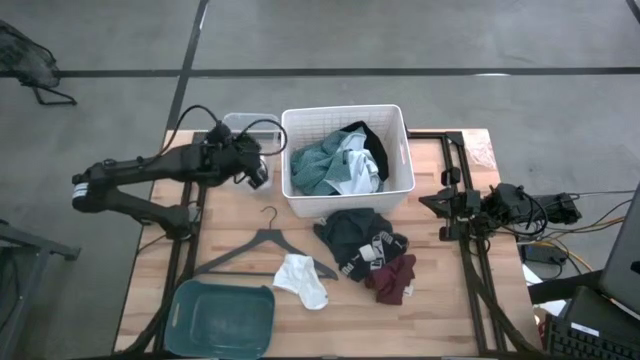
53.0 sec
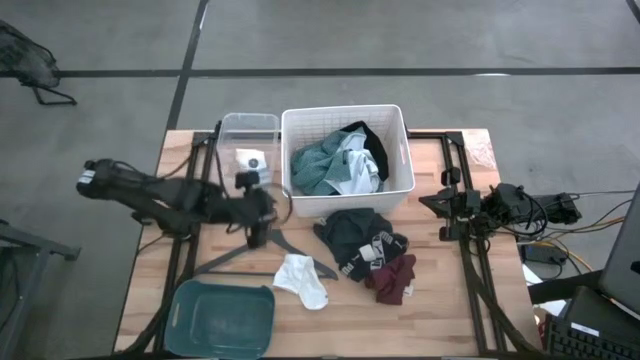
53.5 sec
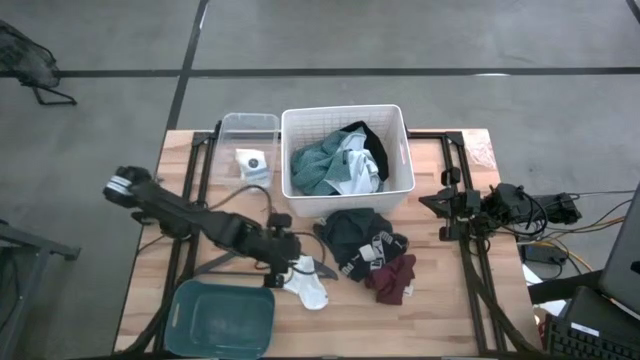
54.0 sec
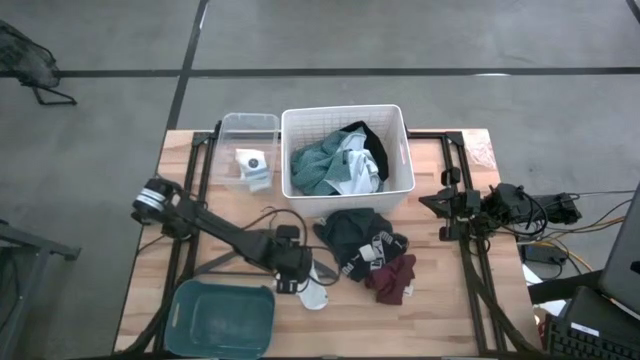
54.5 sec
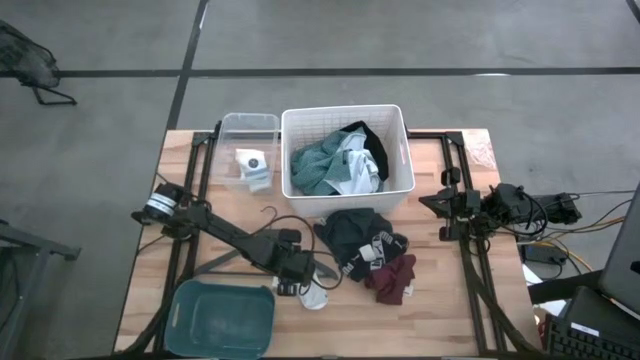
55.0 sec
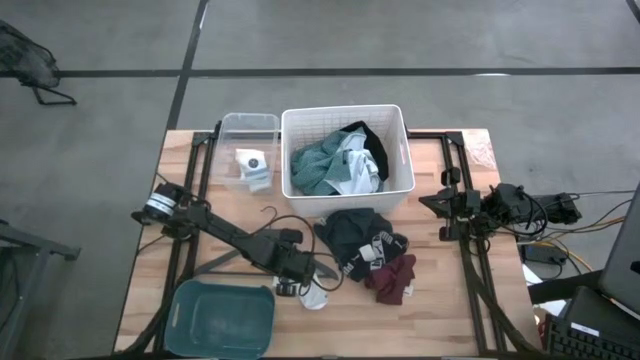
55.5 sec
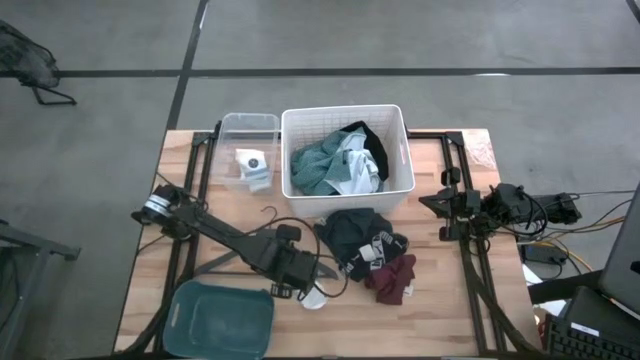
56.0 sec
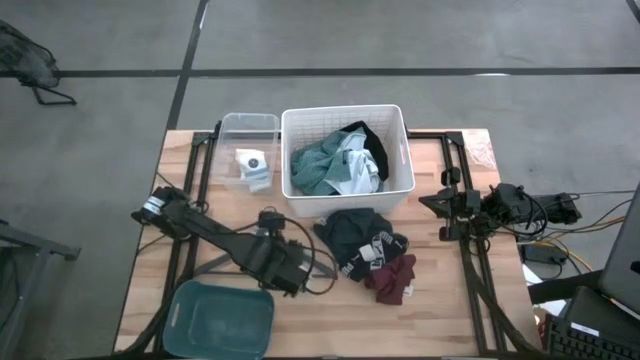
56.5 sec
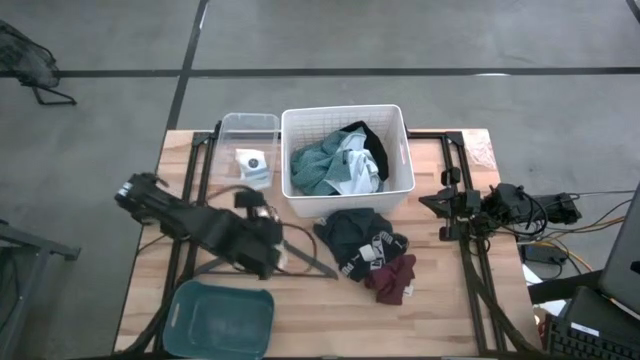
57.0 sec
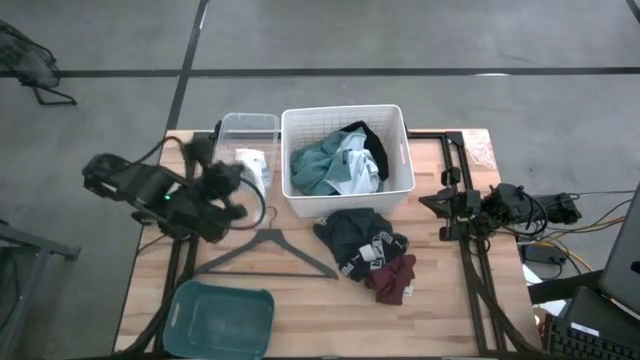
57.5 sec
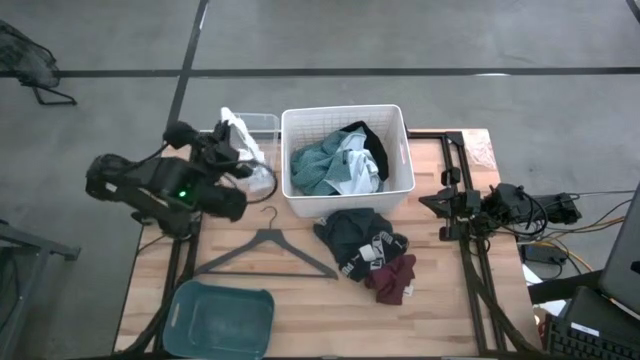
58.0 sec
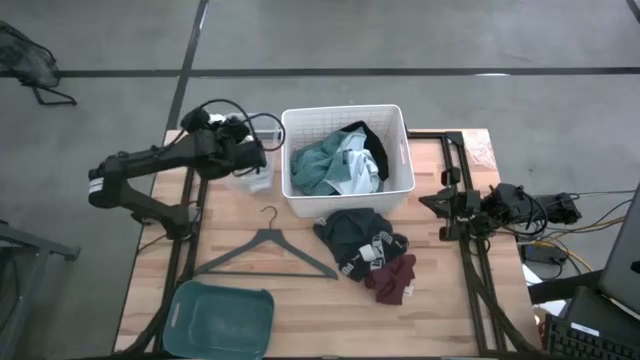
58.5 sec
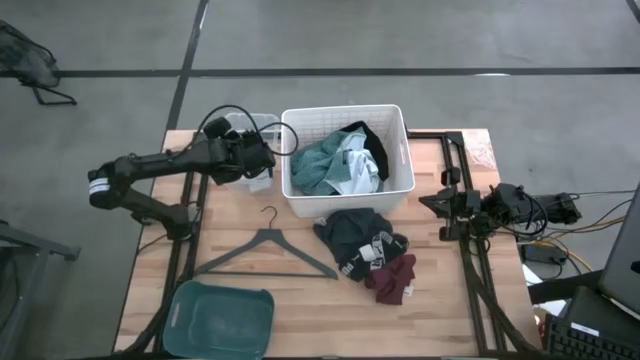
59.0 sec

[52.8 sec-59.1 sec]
Task: Pick & Place Cloths
Put the white sock into the transparent bin

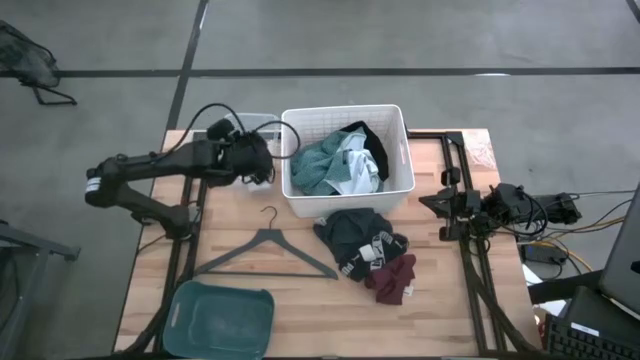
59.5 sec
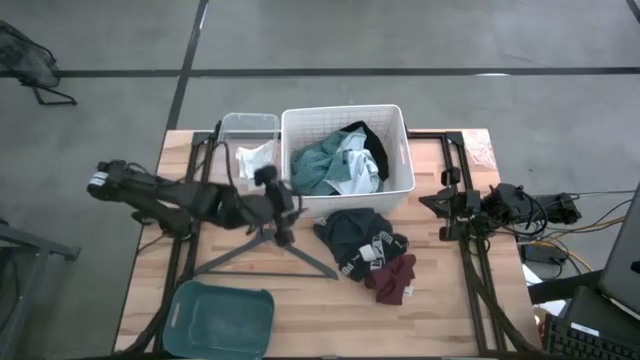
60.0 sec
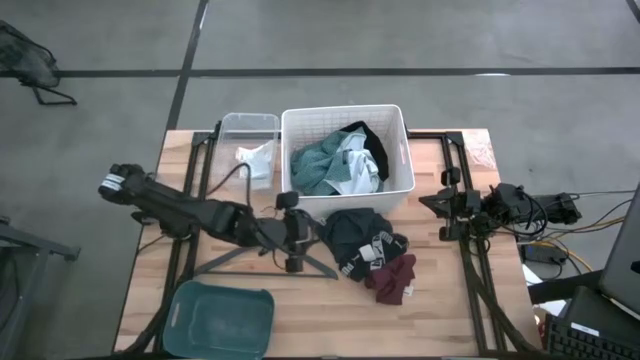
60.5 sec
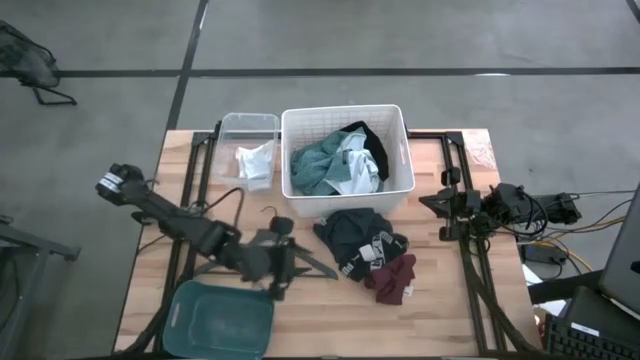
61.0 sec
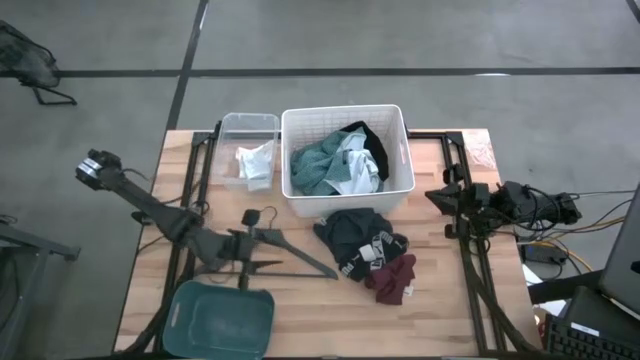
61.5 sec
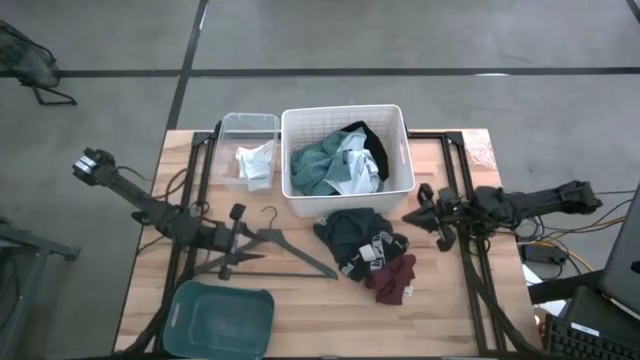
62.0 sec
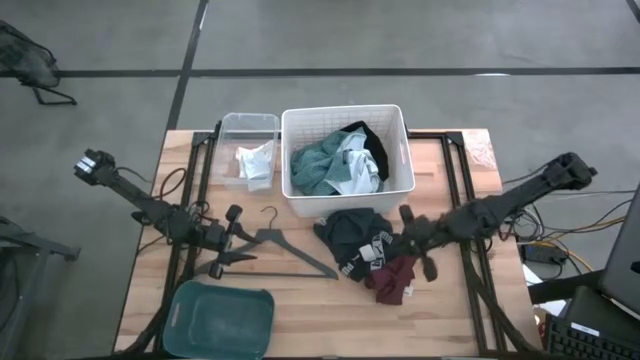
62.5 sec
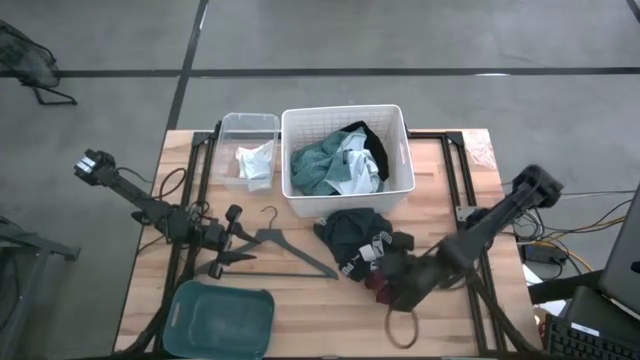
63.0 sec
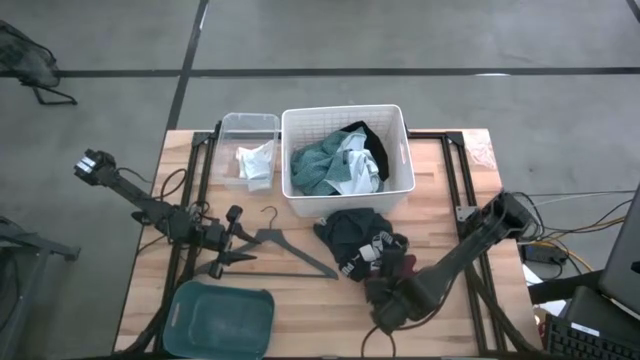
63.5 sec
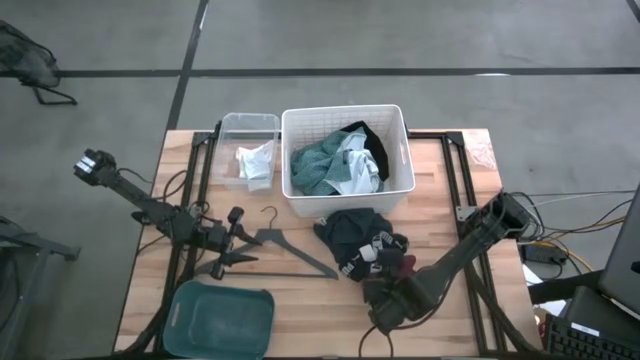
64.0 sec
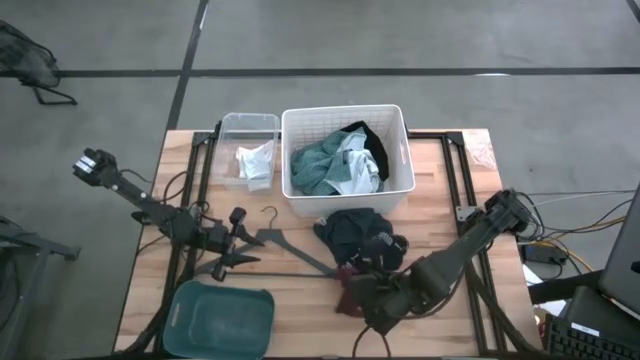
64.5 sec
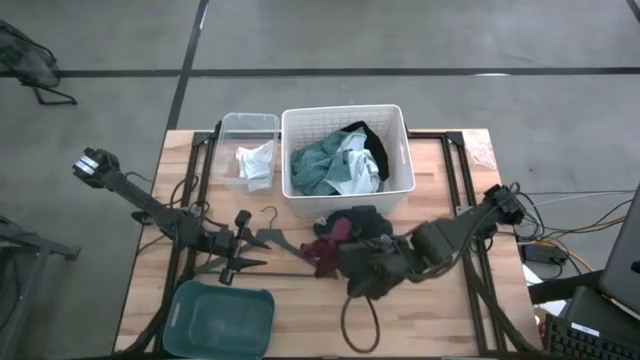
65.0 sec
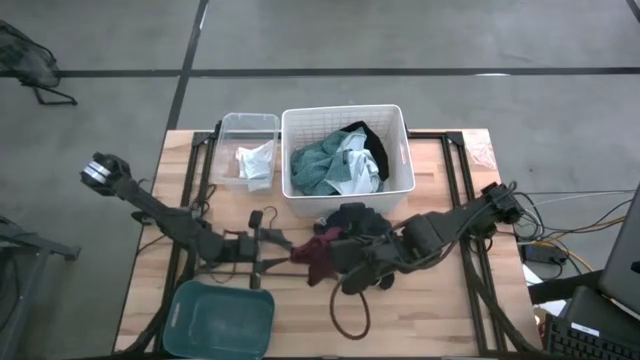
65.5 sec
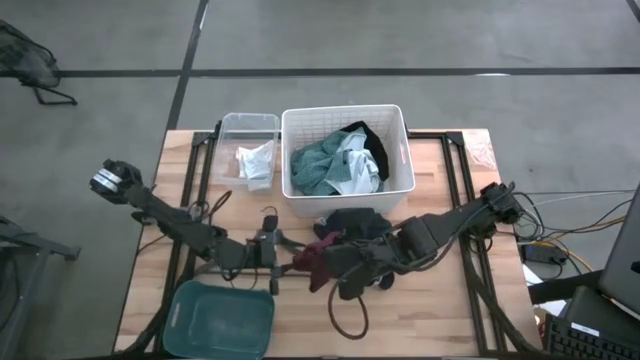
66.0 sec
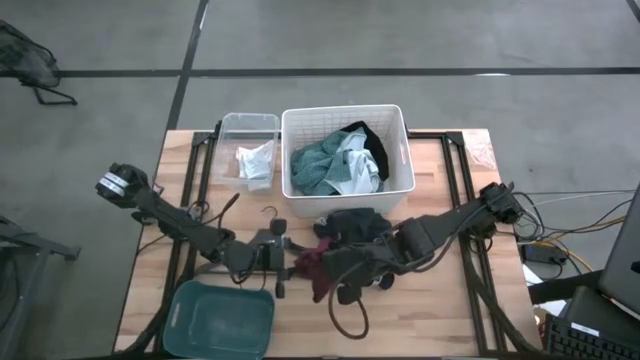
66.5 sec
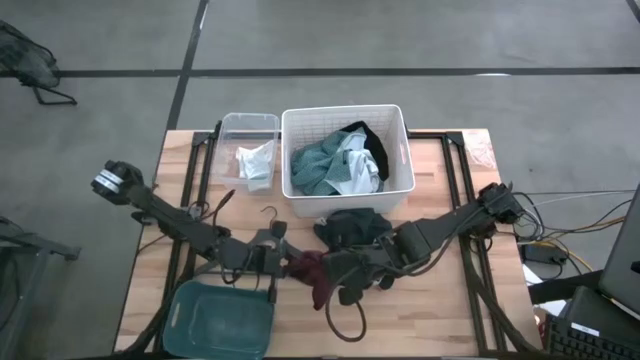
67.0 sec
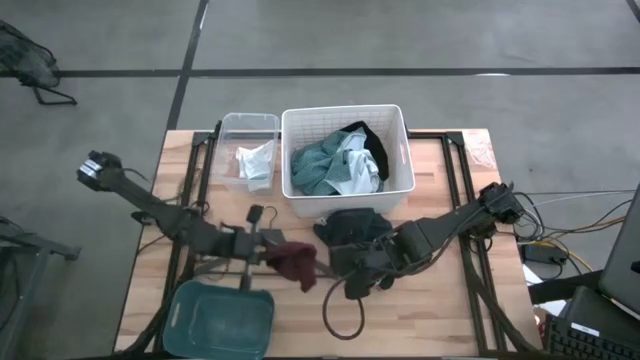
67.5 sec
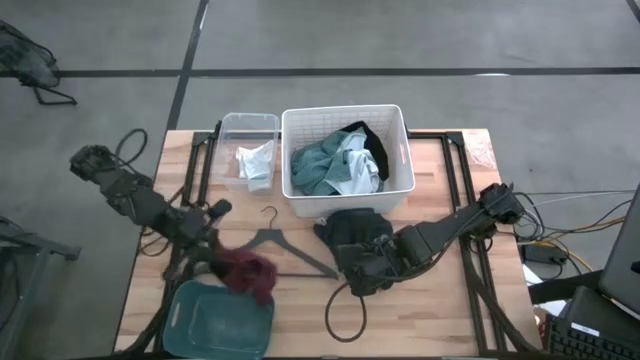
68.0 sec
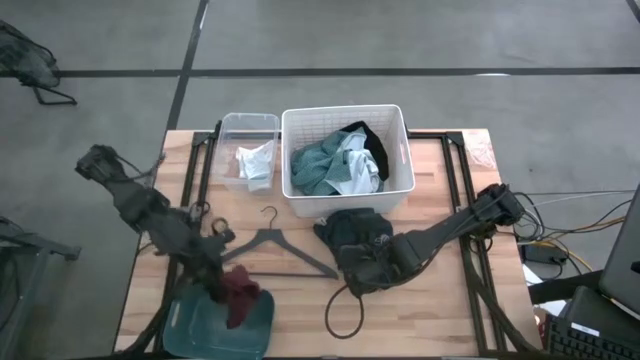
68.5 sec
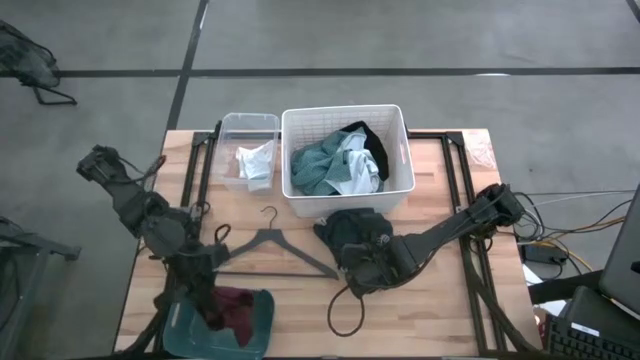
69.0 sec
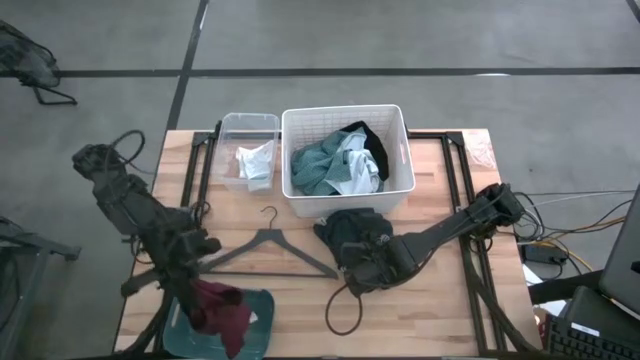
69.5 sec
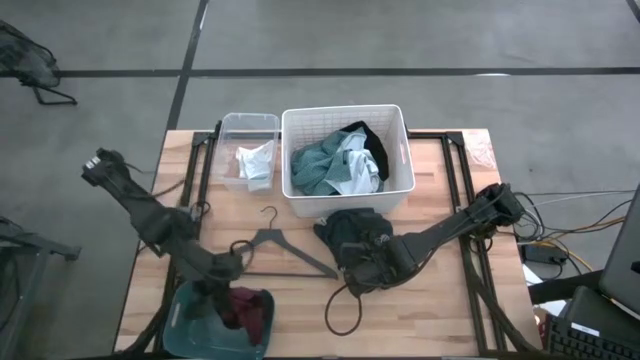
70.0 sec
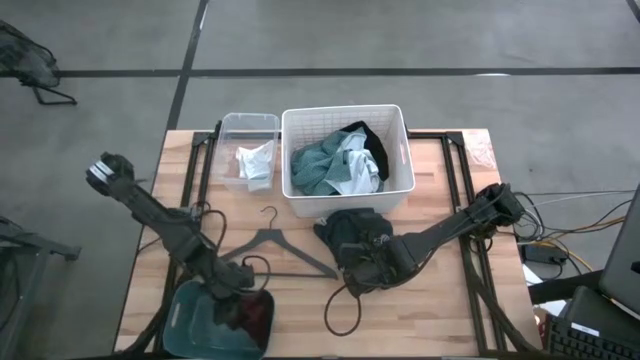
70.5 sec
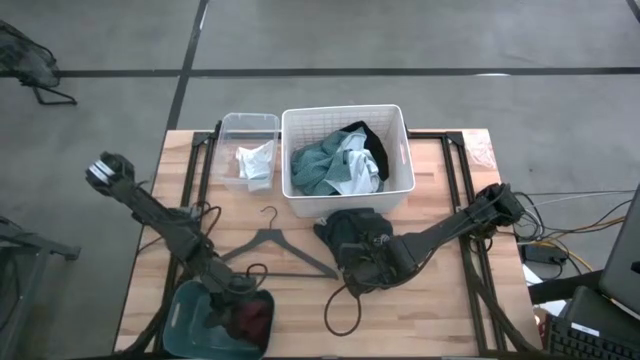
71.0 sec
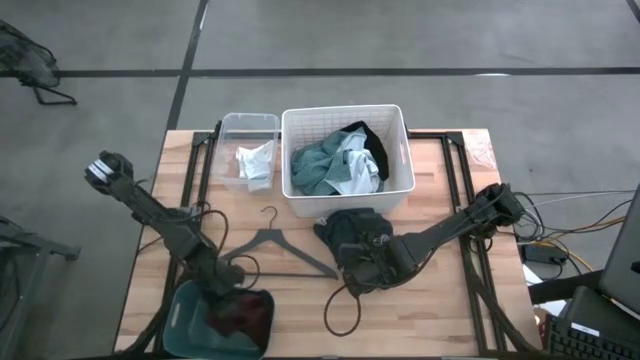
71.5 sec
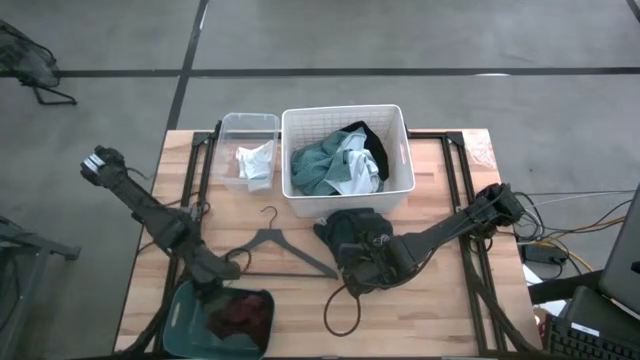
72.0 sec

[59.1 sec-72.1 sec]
Put the red boxers into the gray bin

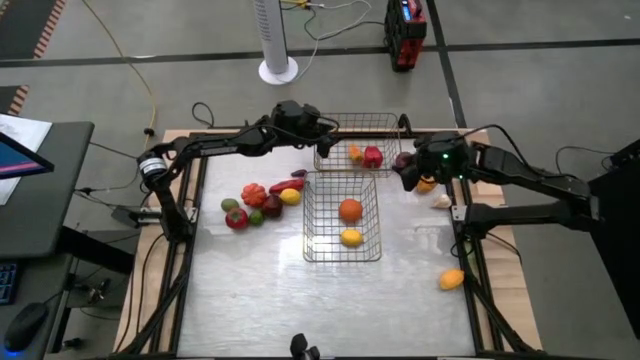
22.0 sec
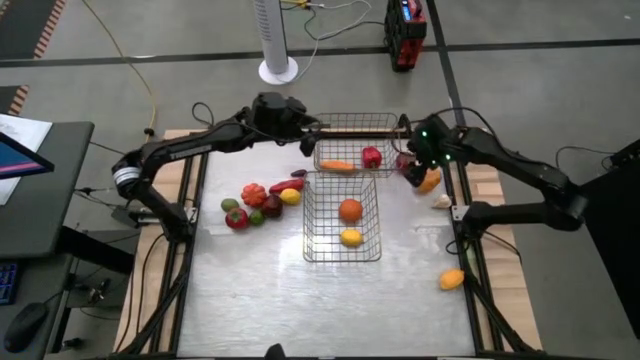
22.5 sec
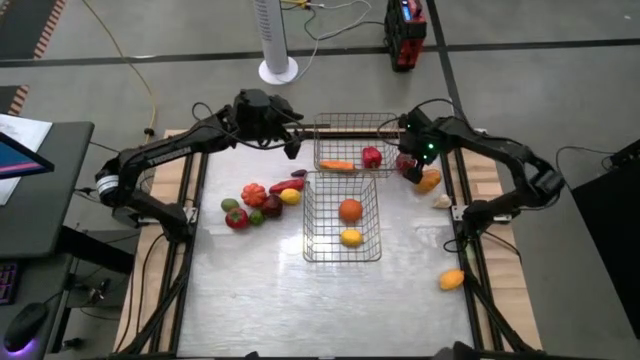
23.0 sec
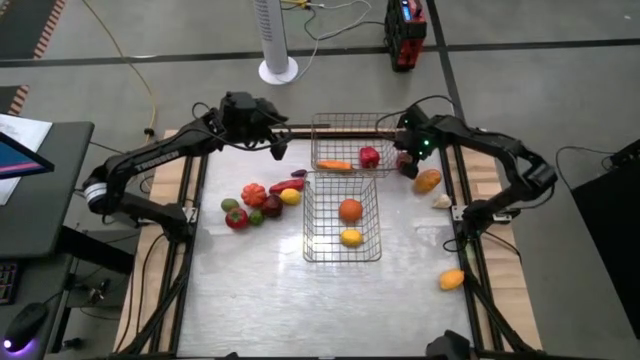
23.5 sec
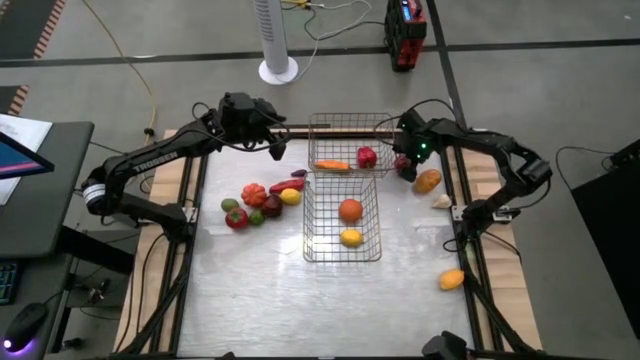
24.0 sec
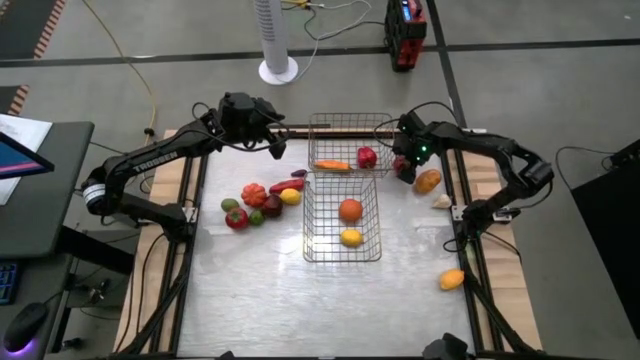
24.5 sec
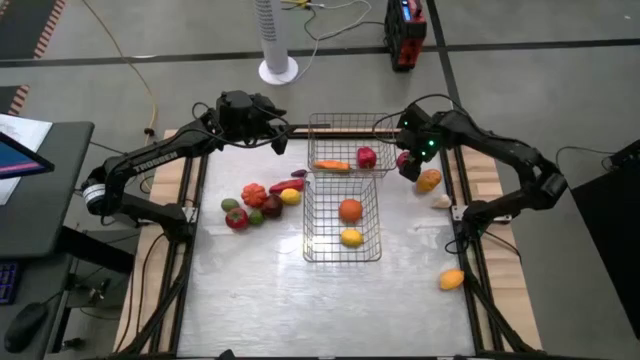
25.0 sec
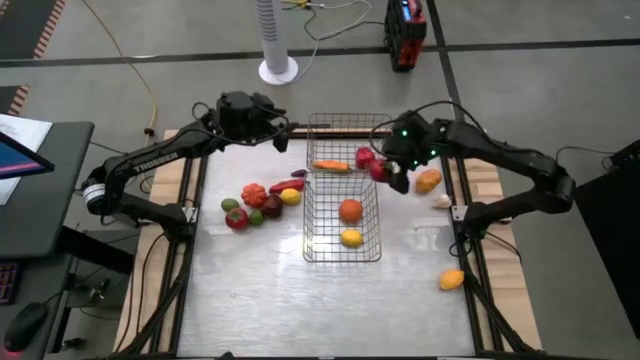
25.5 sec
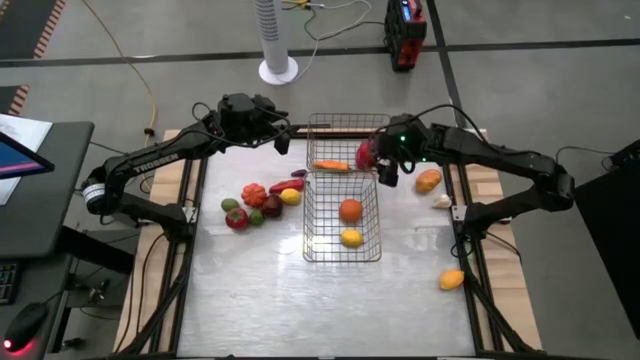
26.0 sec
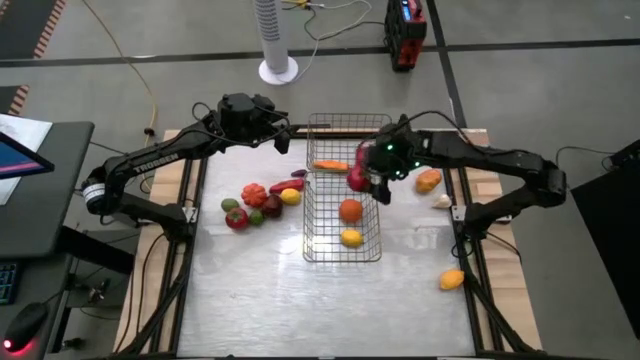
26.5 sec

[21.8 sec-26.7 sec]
Task: Sort produce into baskets
Put the right tomato into the bottom wire basket
